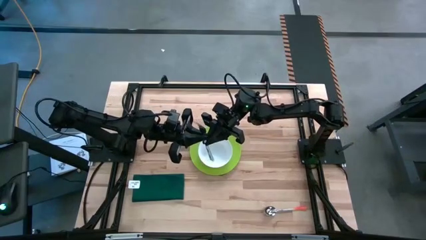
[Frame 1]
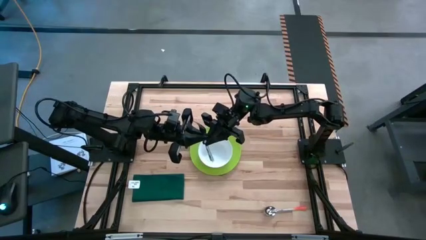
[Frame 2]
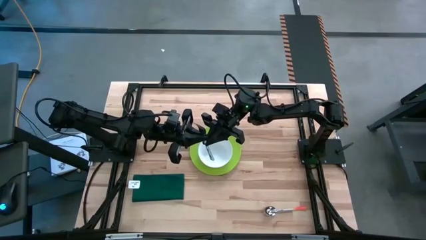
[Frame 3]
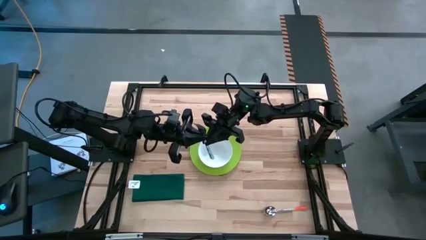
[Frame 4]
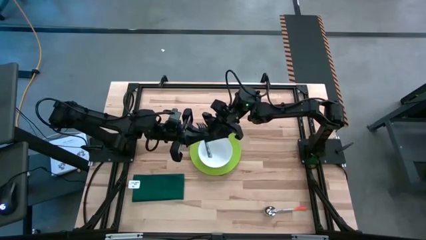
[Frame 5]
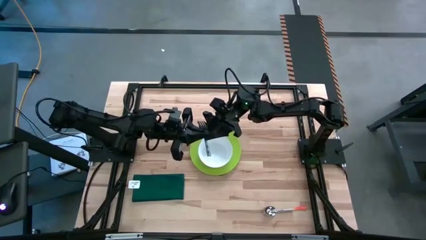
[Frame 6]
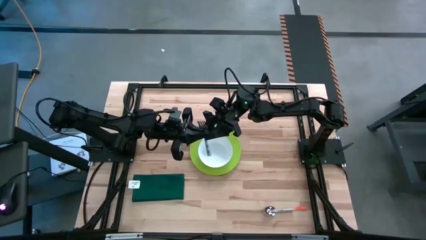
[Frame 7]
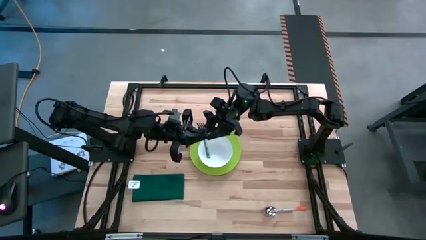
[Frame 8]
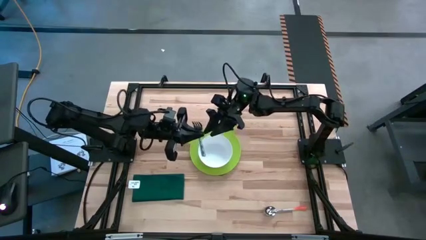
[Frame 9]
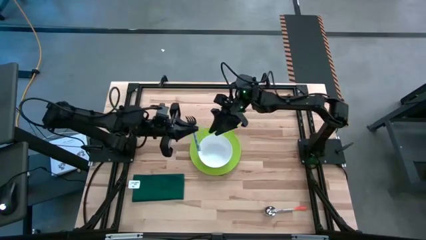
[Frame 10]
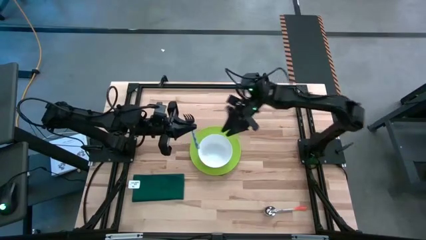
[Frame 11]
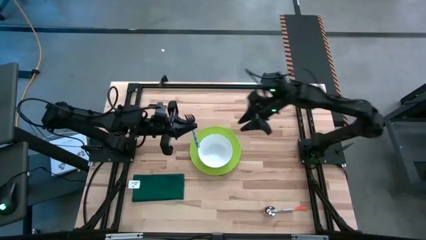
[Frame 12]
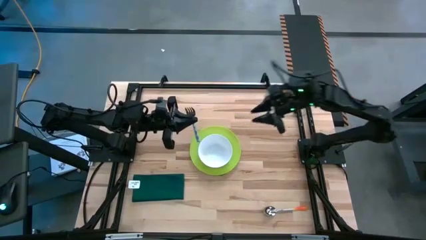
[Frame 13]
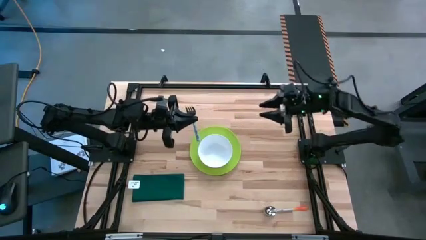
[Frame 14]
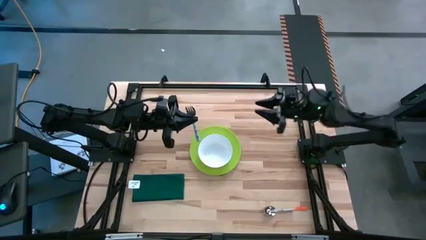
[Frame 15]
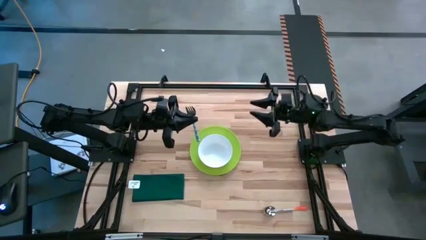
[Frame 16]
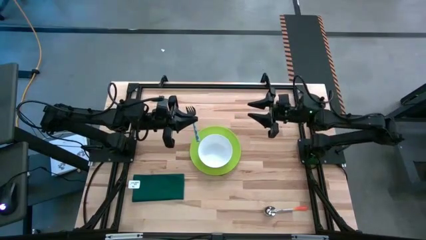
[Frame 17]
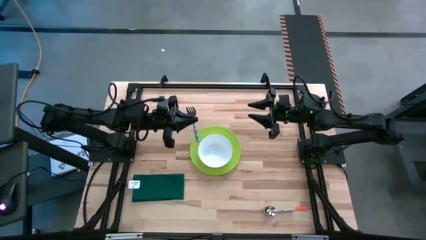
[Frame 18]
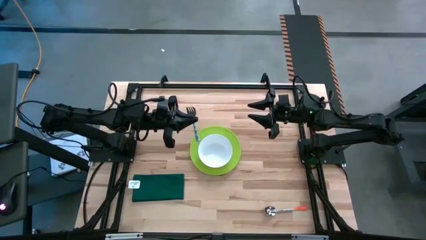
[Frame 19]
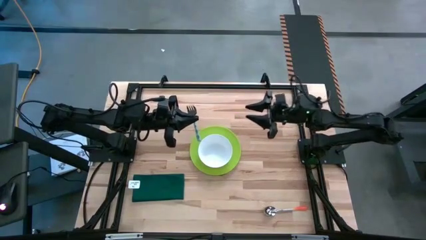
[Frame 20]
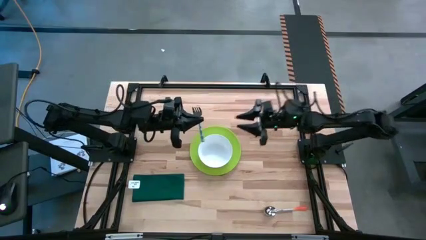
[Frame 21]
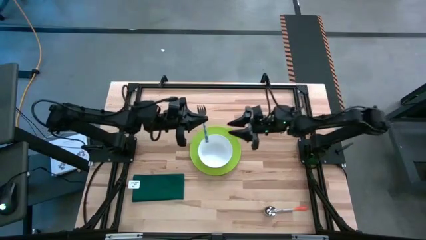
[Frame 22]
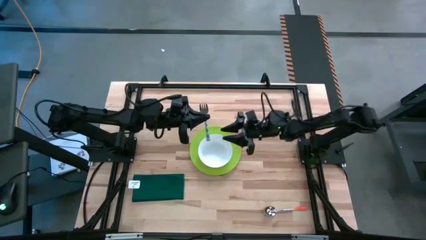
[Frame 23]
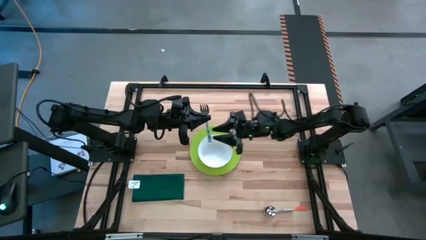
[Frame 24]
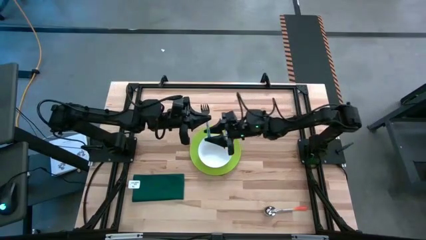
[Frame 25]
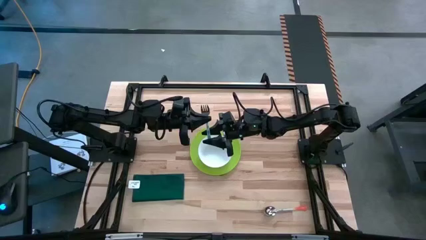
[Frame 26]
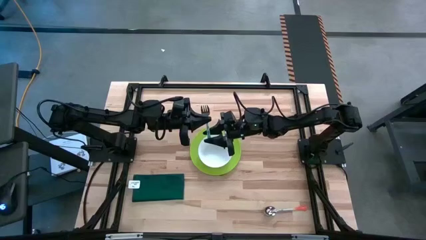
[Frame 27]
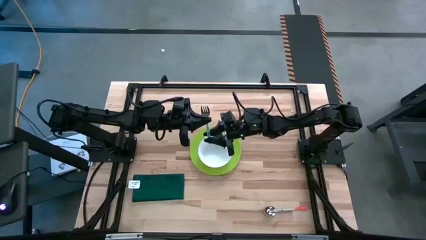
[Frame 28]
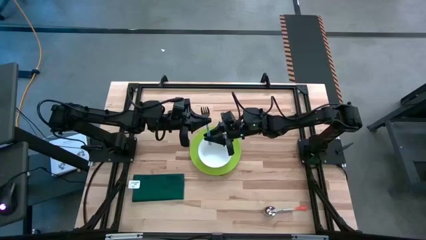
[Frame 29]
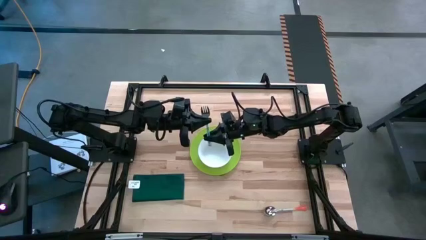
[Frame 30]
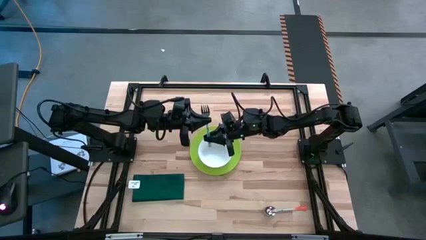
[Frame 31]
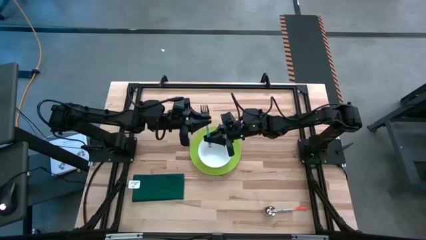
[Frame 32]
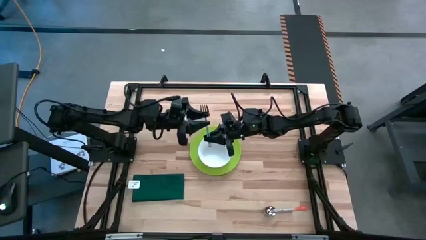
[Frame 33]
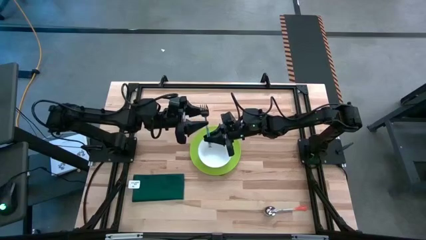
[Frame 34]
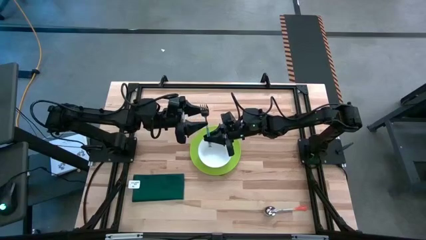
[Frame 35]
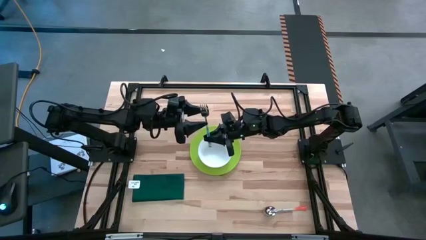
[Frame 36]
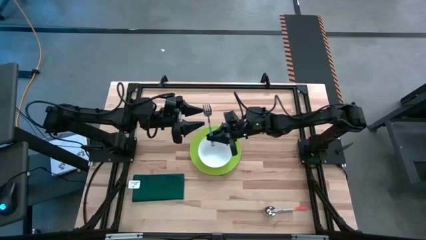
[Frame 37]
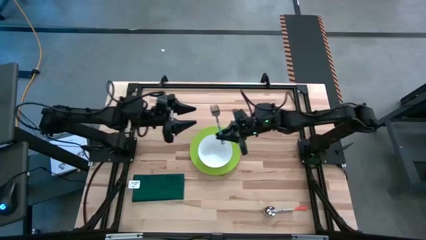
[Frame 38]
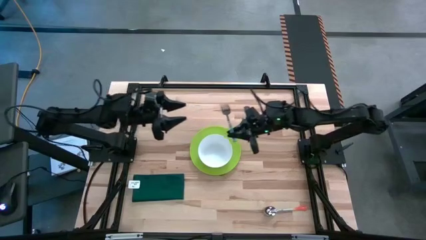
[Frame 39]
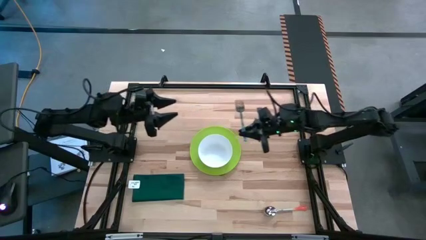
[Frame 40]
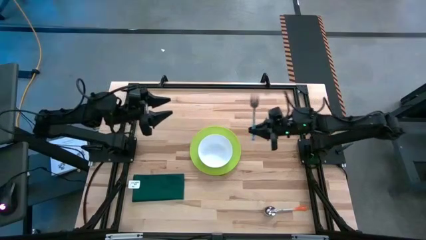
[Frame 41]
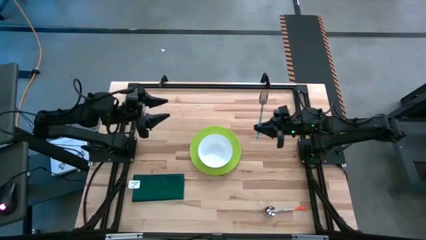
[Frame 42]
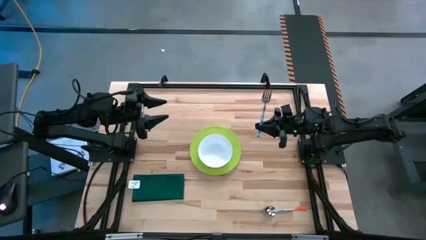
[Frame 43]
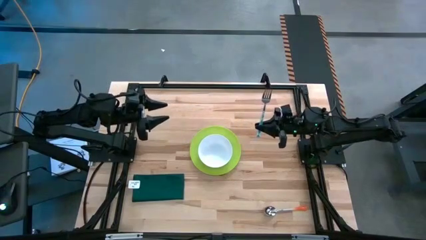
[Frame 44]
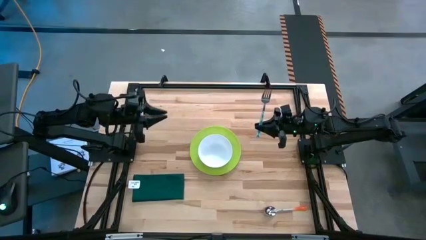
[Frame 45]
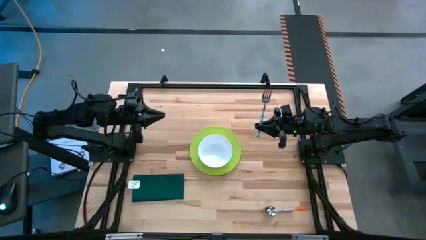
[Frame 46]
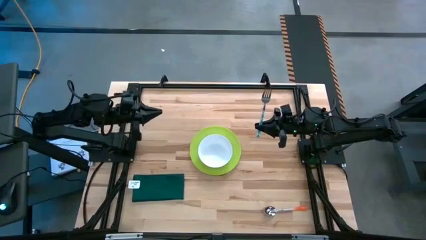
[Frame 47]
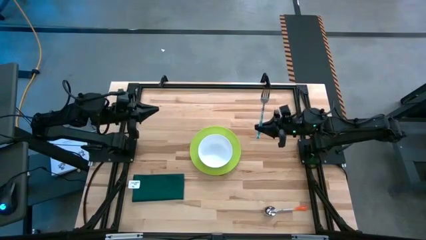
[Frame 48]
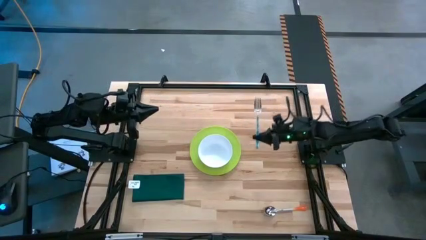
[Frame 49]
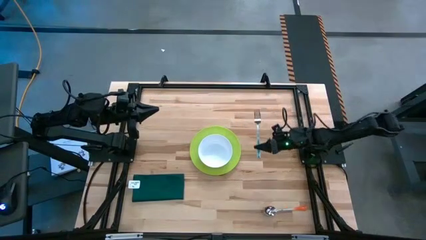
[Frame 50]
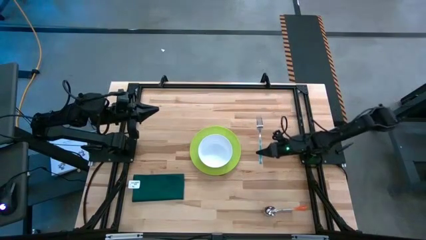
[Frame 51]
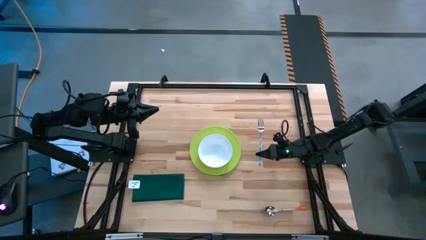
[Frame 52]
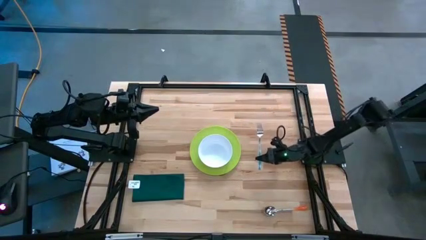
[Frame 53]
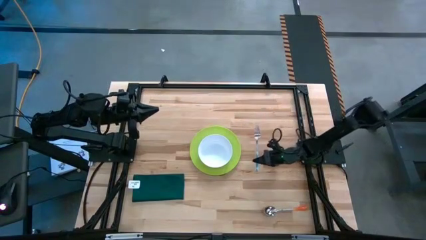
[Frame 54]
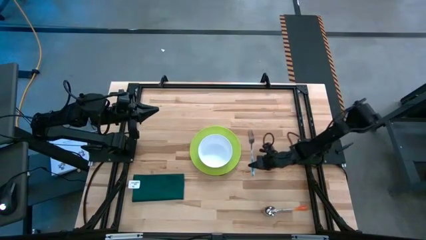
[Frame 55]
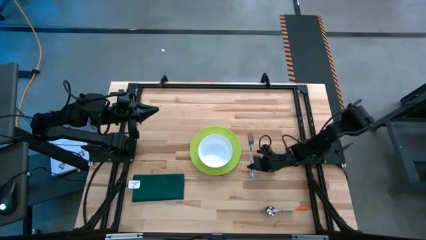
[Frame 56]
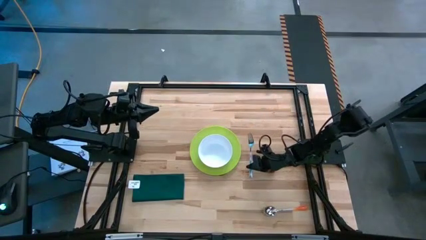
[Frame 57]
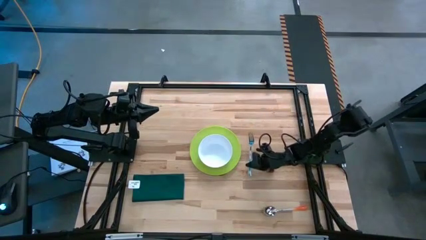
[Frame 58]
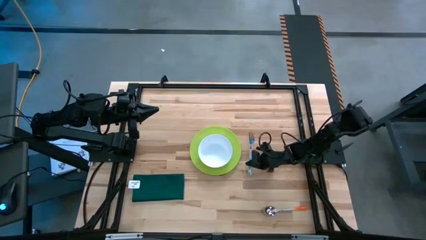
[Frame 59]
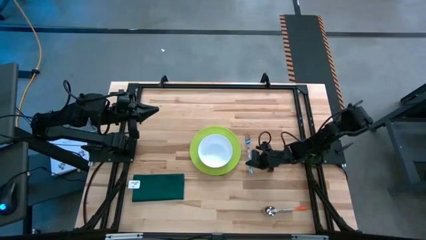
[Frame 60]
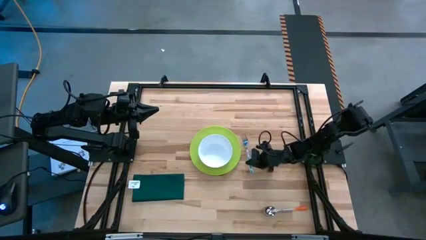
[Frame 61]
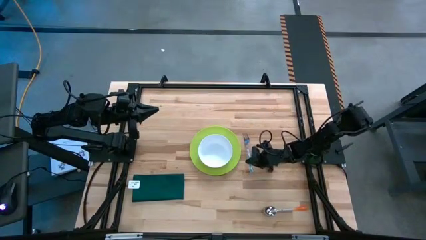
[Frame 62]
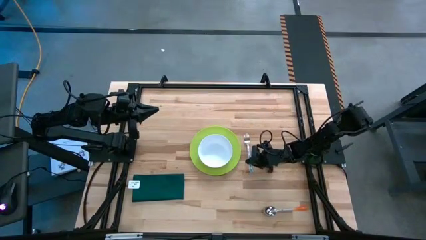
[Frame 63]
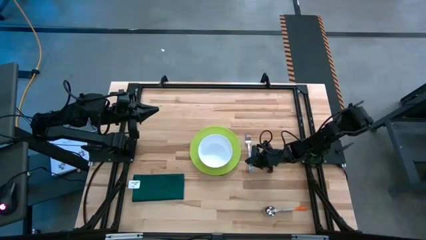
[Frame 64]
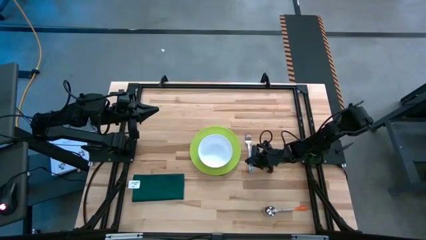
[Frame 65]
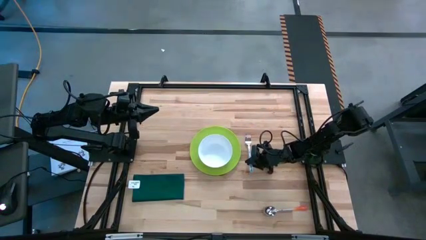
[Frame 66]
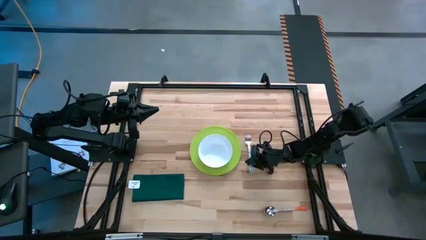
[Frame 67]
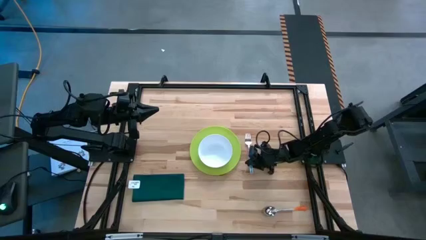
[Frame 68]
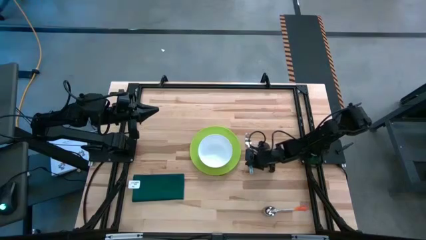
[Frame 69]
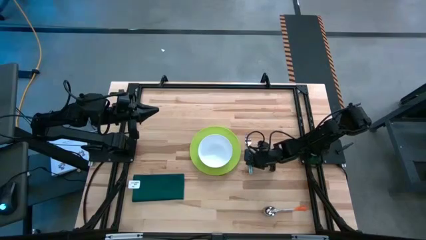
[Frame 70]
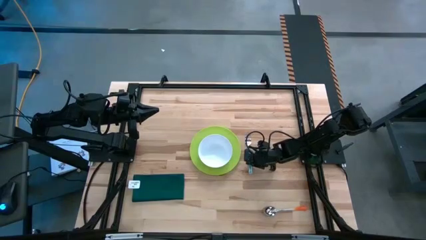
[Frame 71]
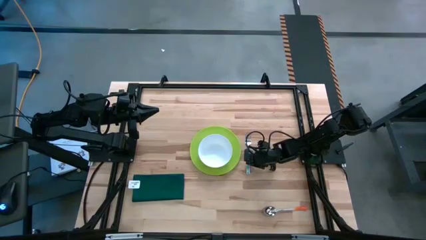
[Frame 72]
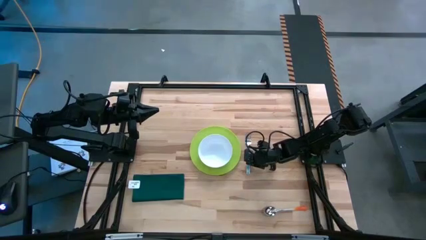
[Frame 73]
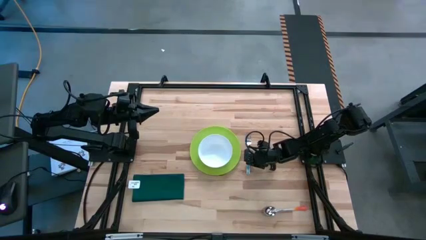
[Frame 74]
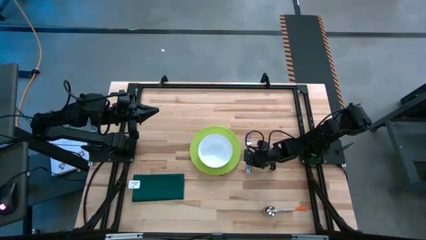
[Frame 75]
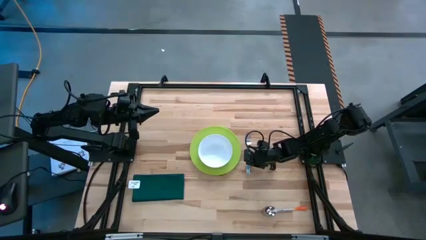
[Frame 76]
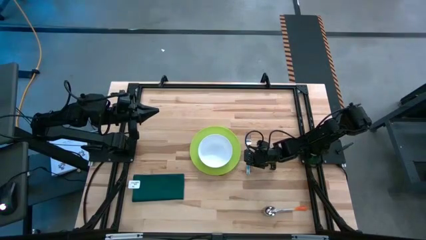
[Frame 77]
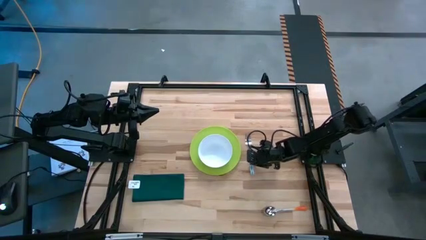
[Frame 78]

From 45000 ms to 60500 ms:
Task: Set table place
Put the blue fork beside the green plate on the table

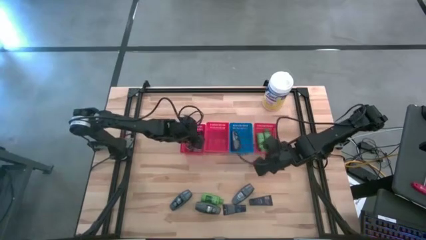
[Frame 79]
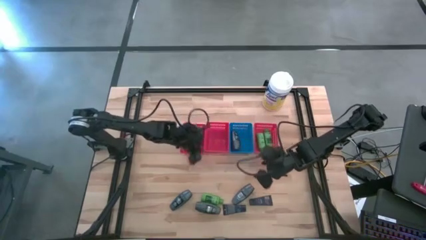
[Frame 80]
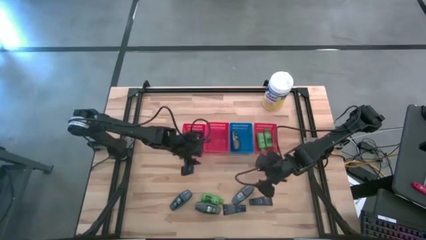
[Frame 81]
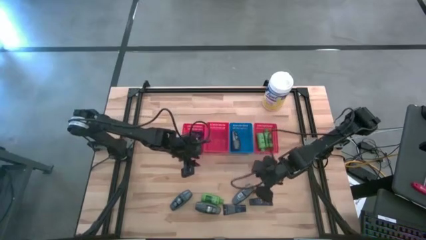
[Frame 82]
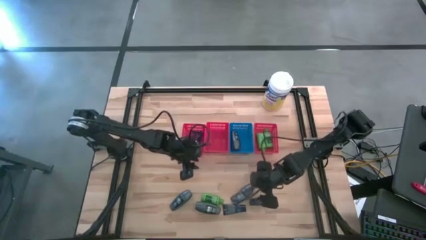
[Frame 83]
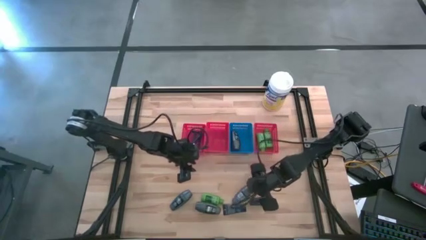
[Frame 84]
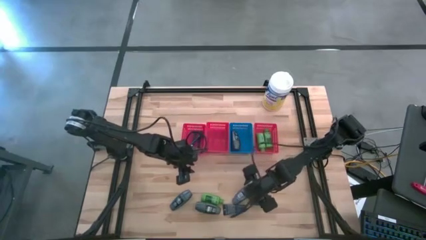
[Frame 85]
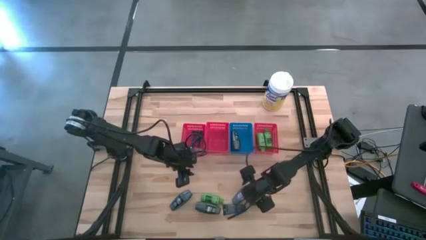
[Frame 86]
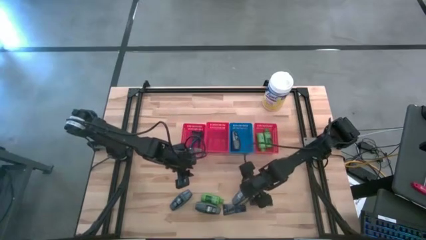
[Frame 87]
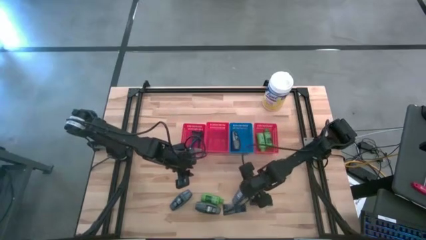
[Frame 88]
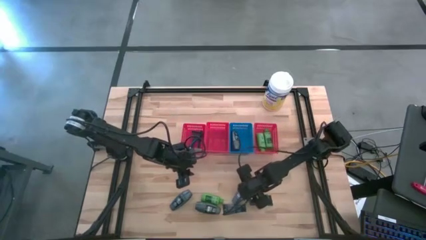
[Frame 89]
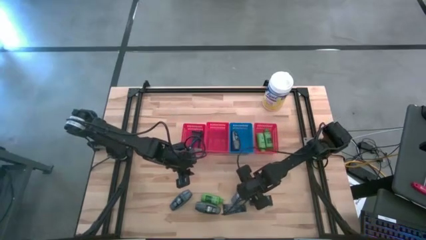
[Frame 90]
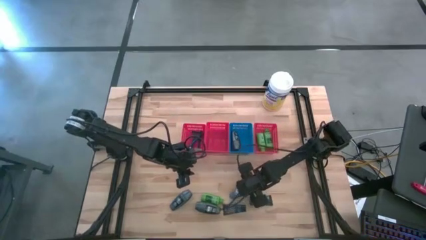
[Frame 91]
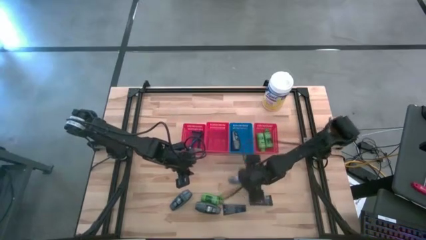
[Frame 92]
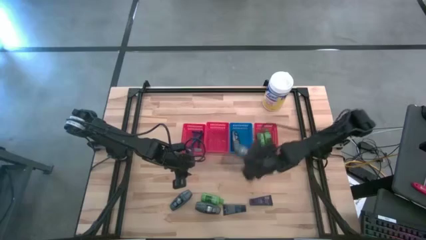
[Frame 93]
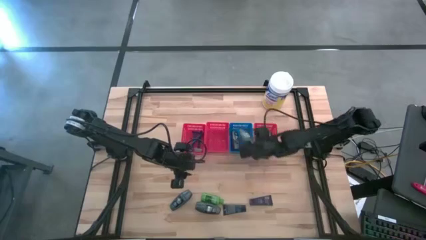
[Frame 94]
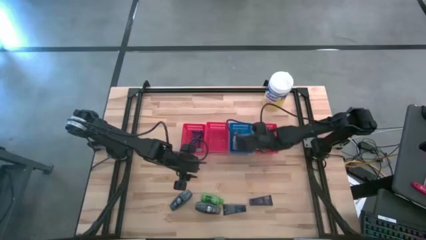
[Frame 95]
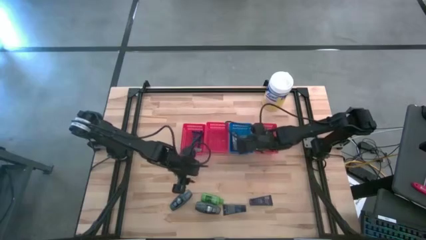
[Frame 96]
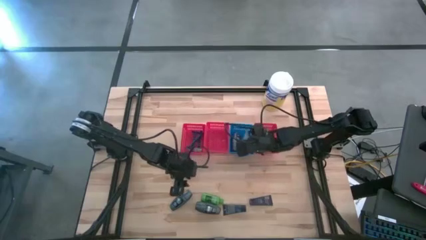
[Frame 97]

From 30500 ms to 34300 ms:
Task: Pick & Place Travel size toiletries
Put the gray deodorant into the blue bin
